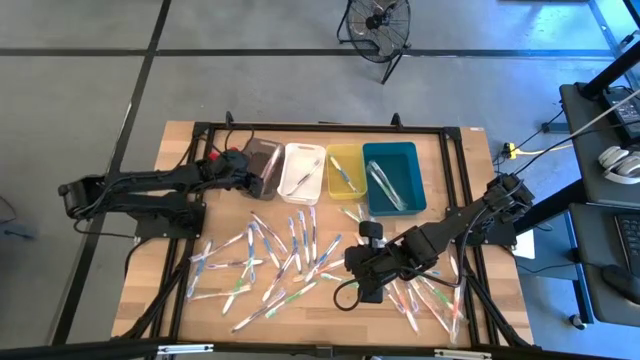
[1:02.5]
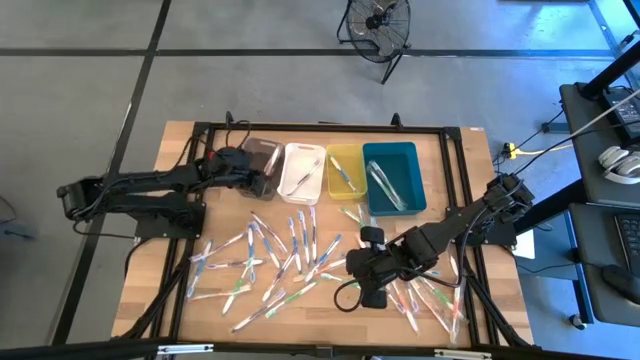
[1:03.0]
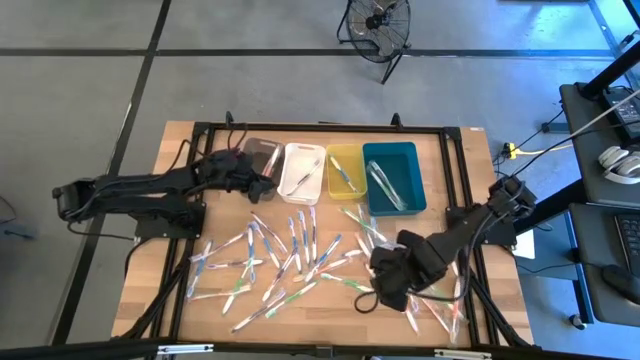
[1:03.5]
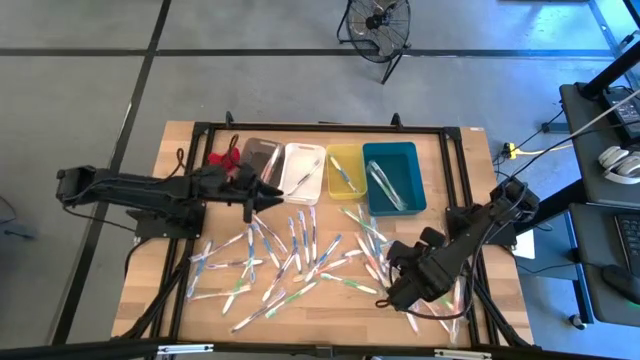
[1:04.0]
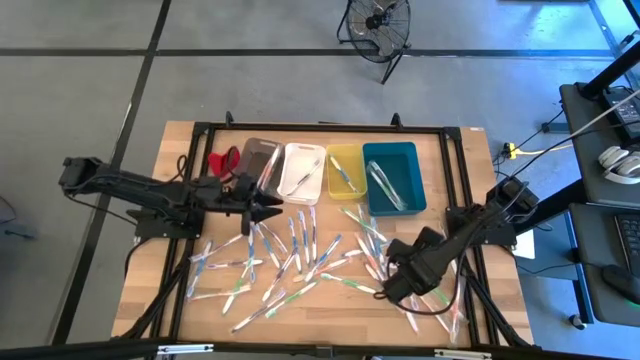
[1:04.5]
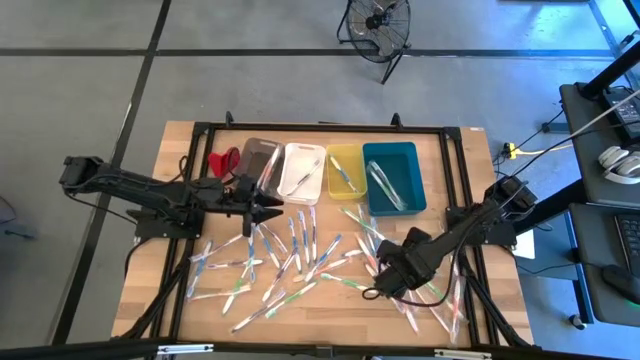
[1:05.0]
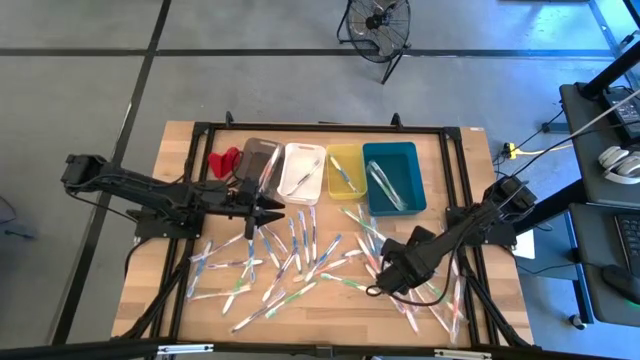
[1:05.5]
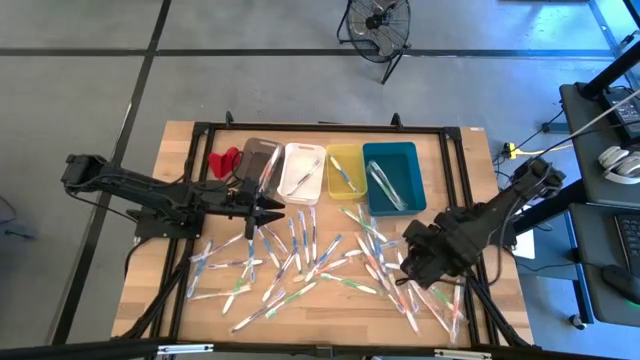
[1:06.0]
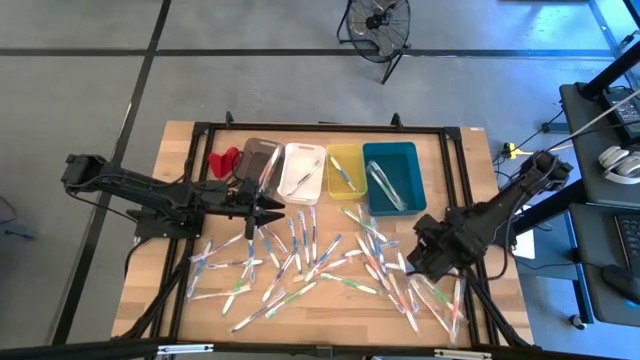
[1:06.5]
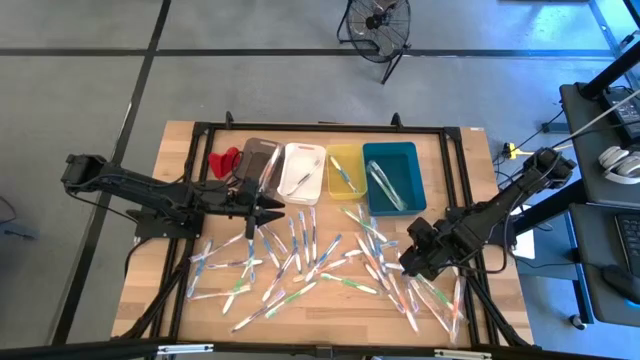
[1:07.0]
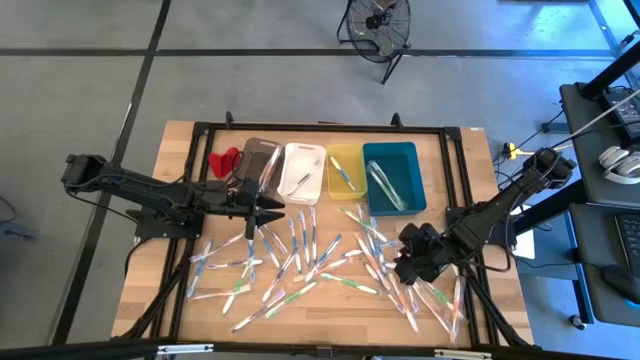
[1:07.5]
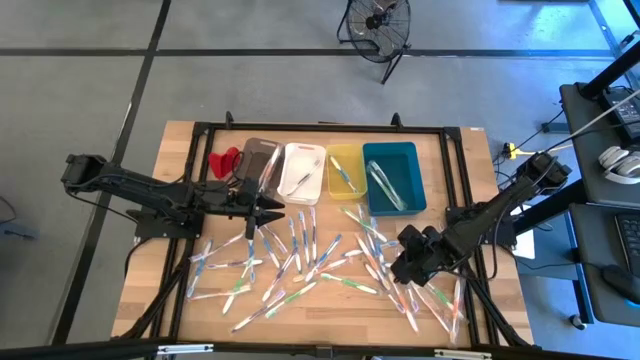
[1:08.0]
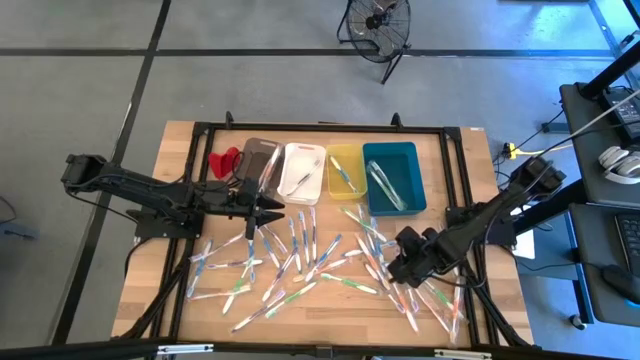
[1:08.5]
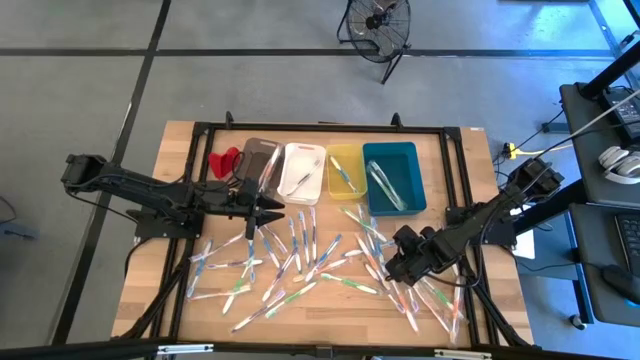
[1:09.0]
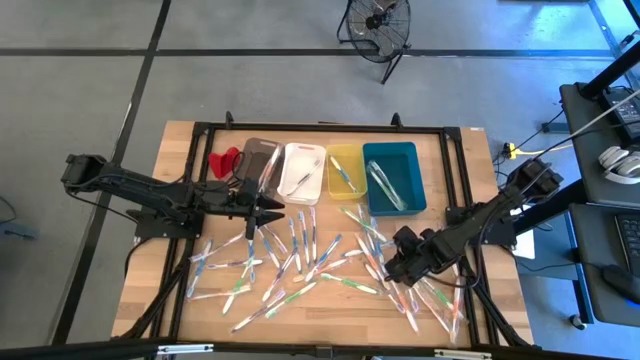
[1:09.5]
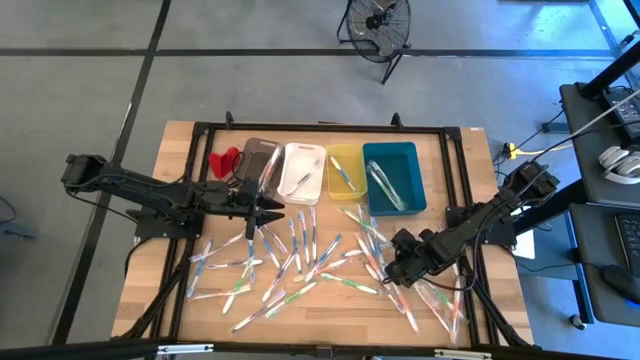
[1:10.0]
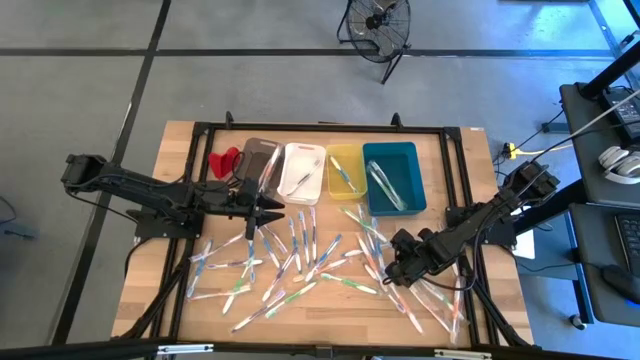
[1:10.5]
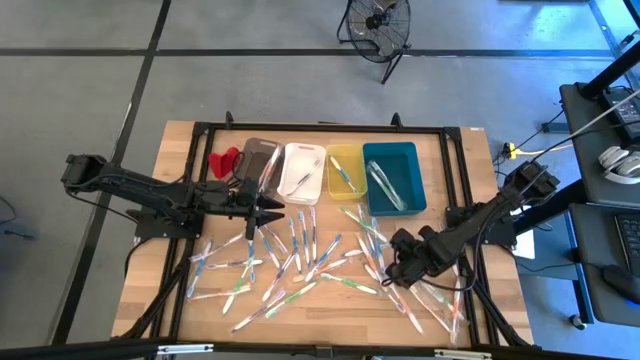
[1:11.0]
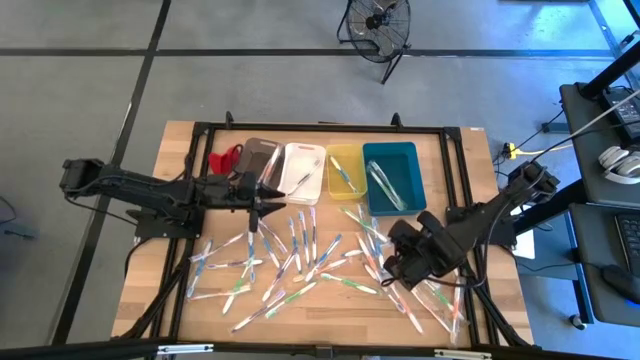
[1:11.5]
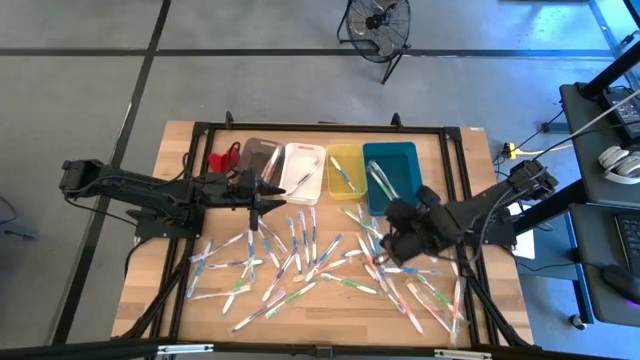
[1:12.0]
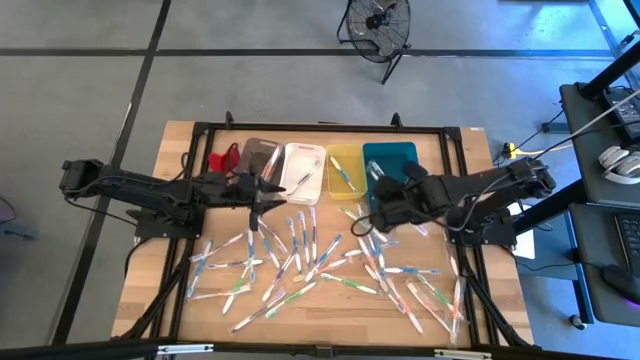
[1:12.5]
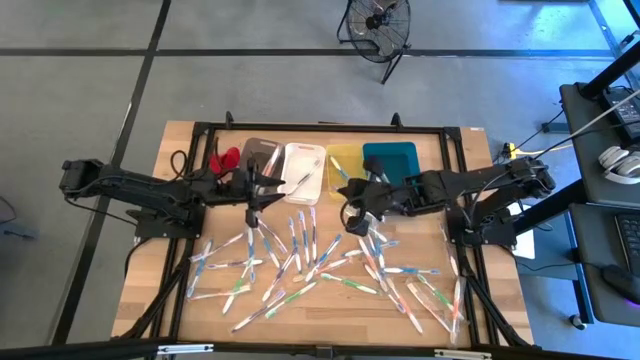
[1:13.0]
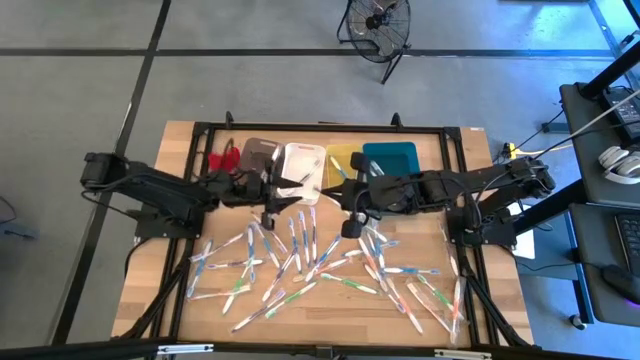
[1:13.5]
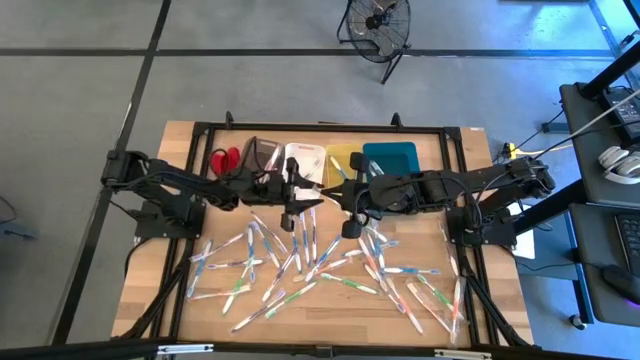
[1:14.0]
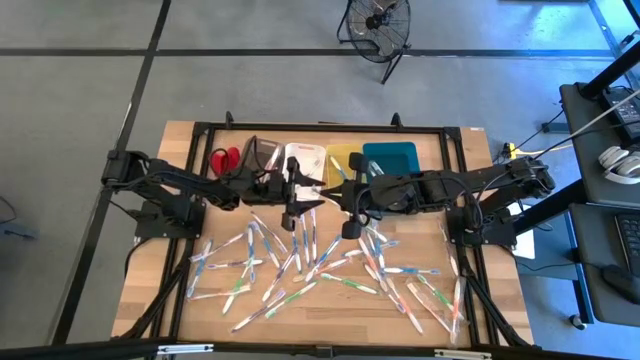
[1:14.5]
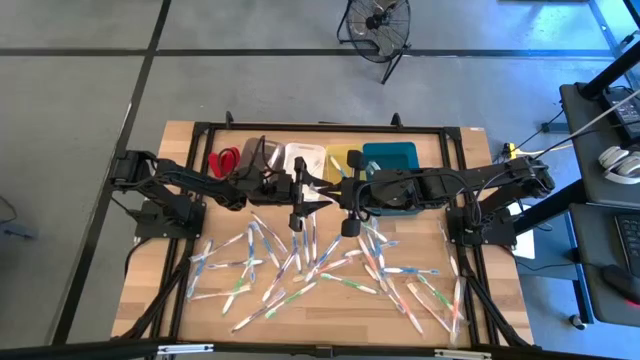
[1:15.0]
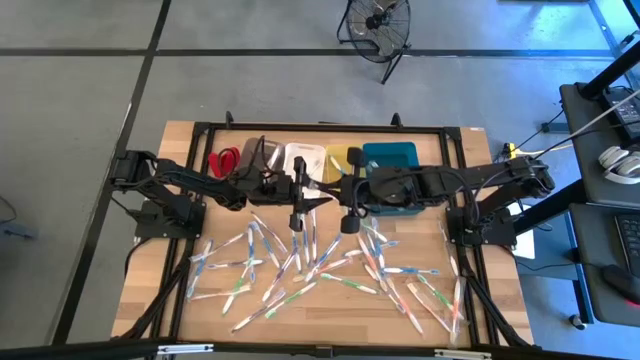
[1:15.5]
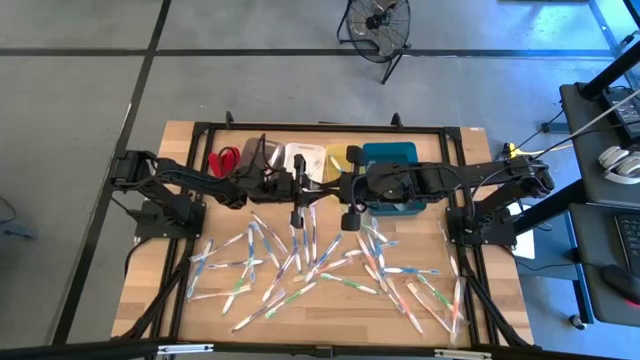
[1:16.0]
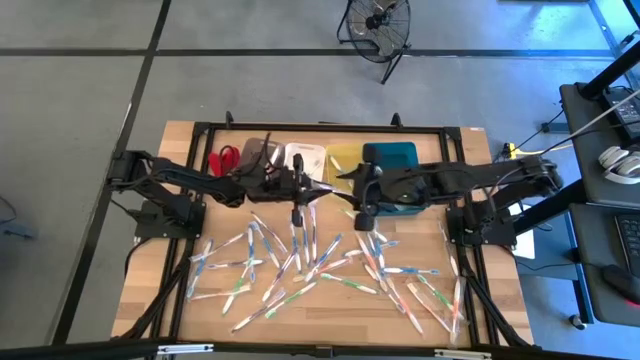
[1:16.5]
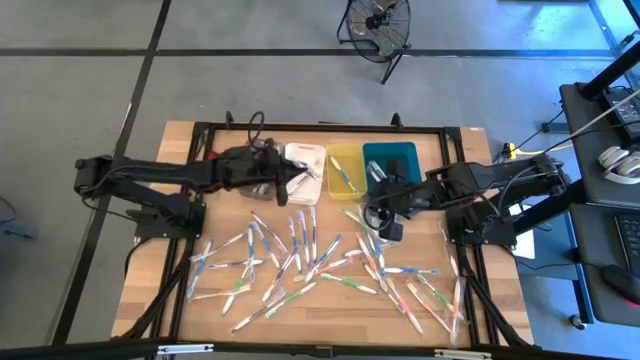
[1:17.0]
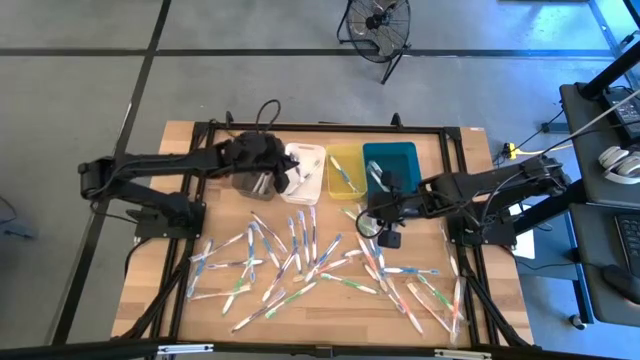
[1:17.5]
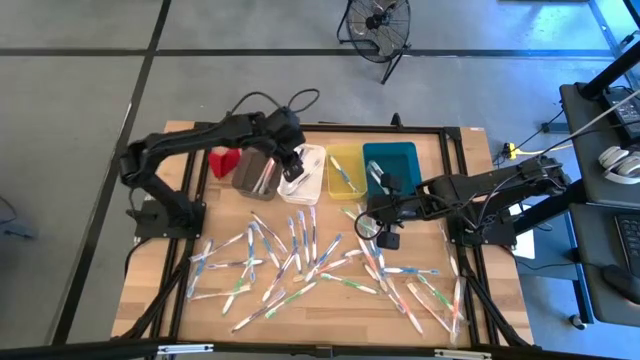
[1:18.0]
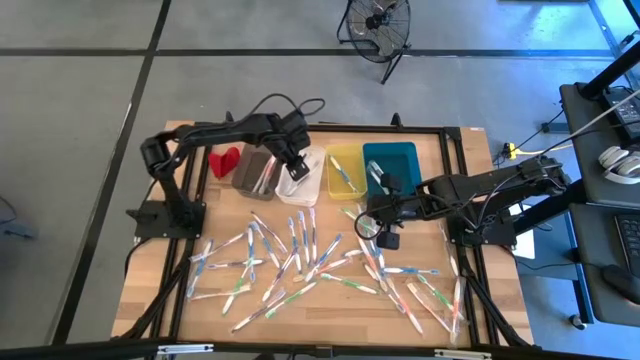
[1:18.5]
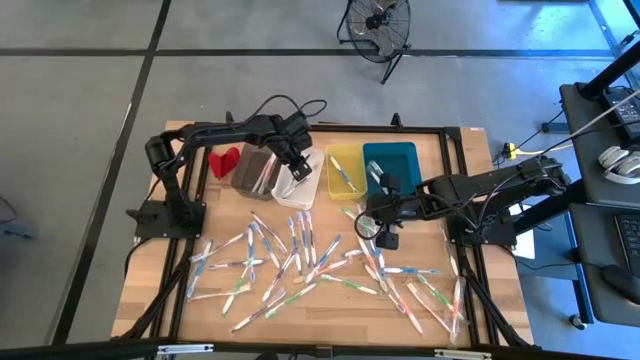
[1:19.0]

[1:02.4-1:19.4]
Task: Pick & Place Toothbrushes
Put the purple toothbrush into the white bin

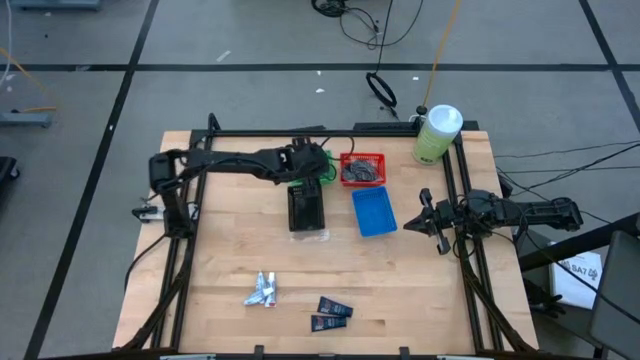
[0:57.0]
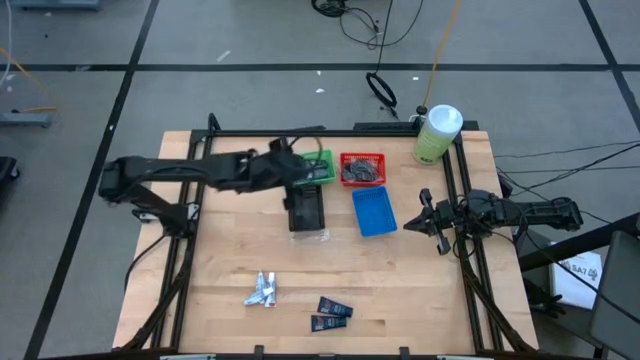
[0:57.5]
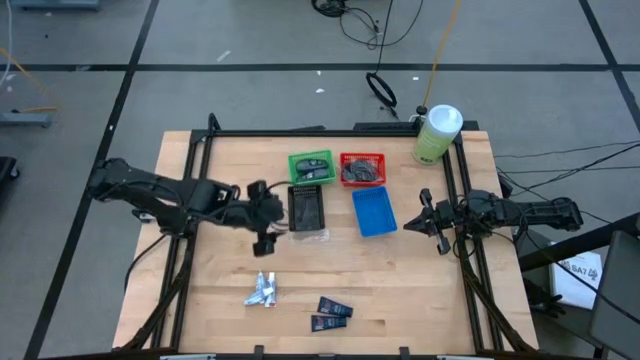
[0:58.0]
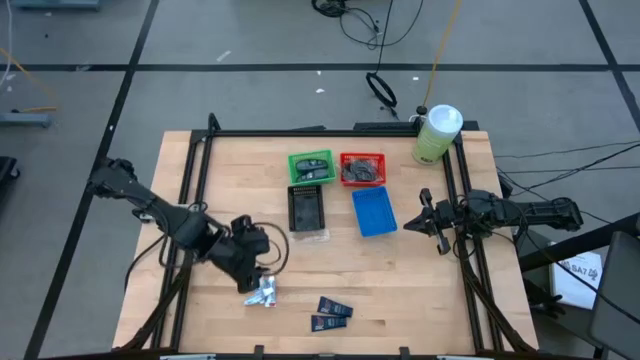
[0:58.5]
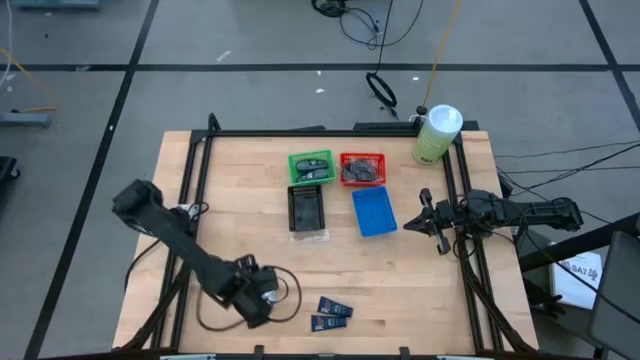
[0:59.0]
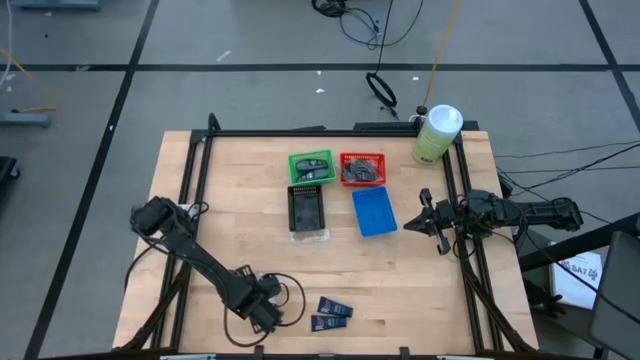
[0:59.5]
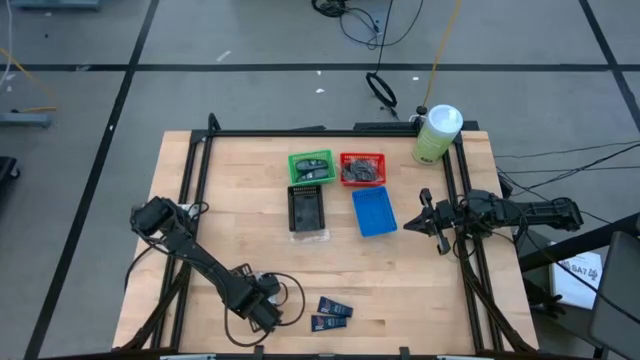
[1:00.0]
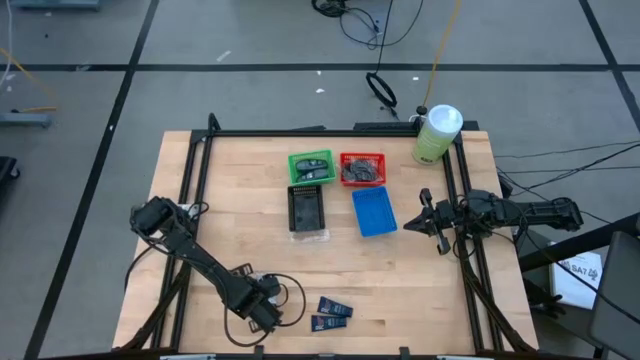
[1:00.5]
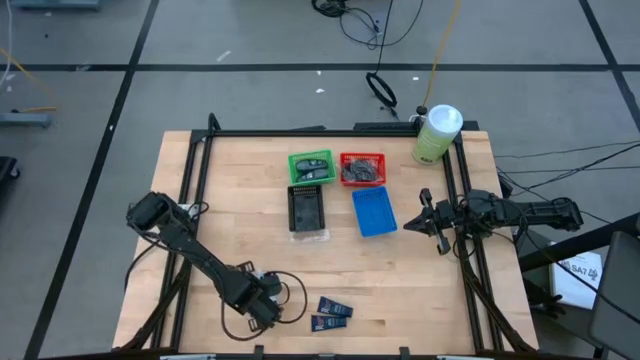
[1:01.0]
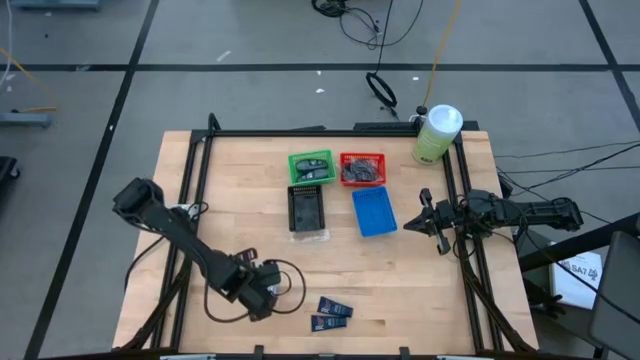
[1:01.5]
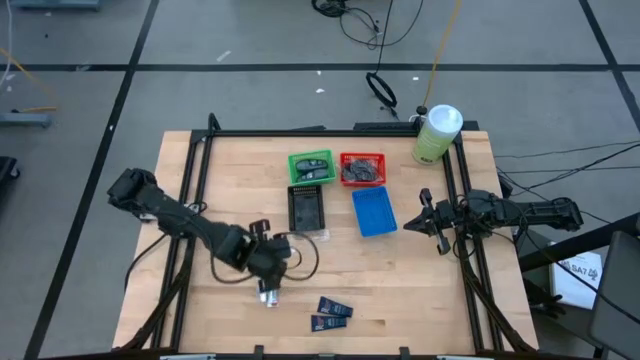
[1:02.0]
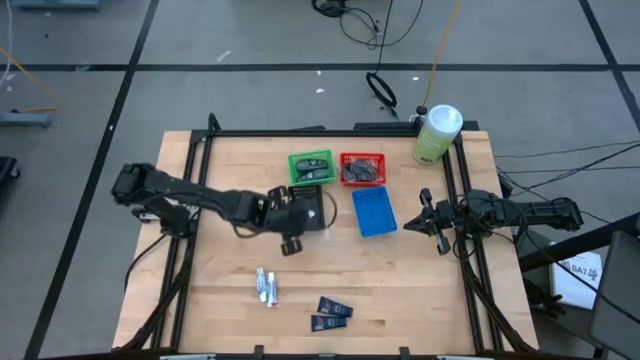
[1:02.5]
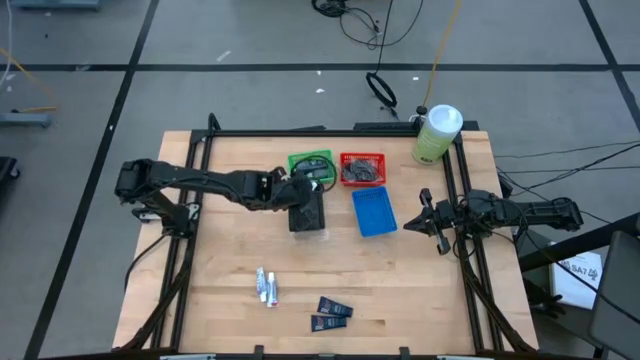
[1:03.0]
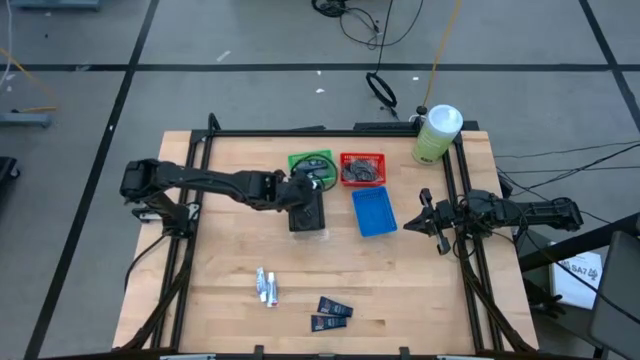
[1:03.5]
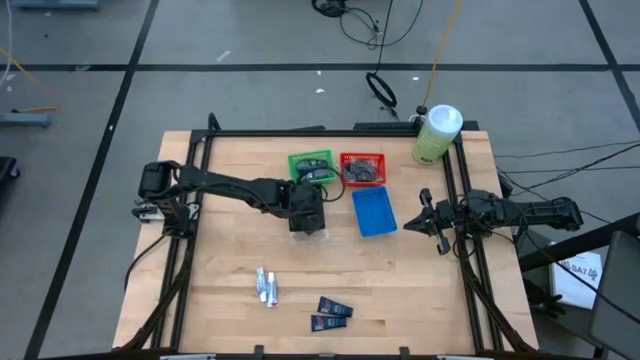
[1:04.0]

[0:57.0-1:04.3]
Task: Pick & Place Travel size toiletries
Put the top white toothpaste into the black bin
